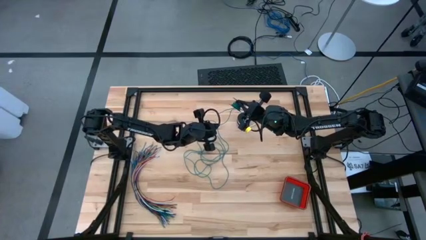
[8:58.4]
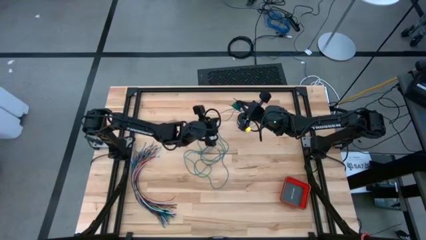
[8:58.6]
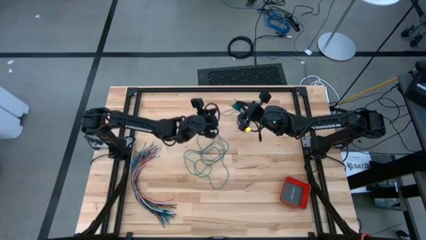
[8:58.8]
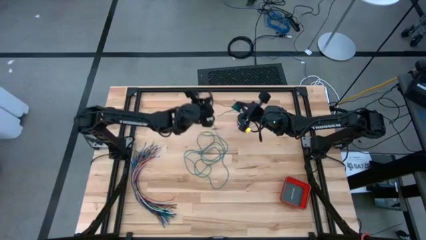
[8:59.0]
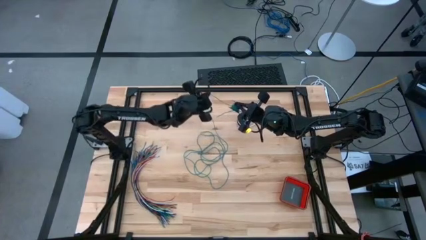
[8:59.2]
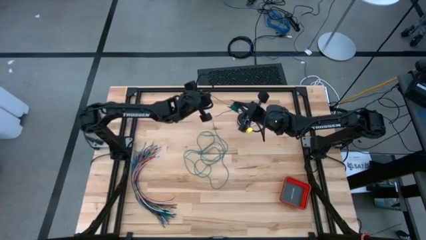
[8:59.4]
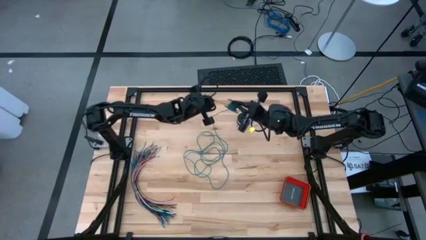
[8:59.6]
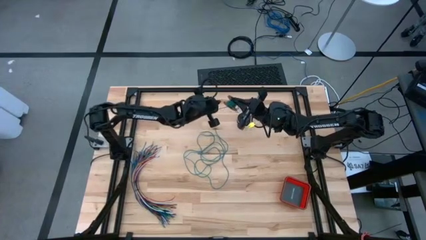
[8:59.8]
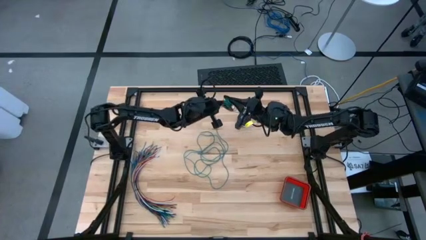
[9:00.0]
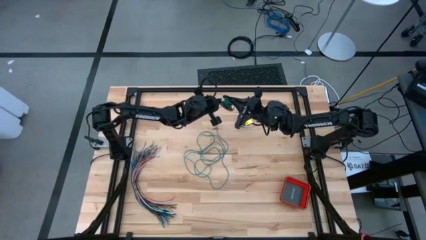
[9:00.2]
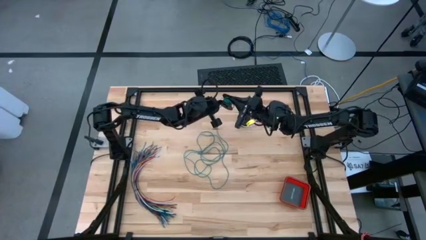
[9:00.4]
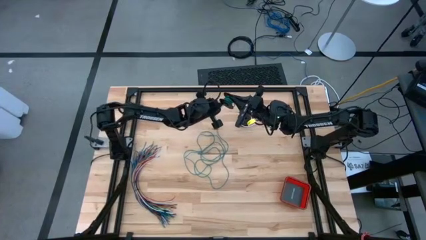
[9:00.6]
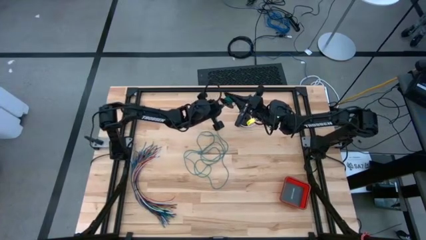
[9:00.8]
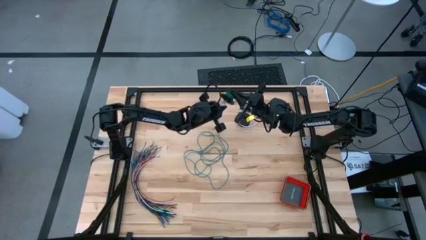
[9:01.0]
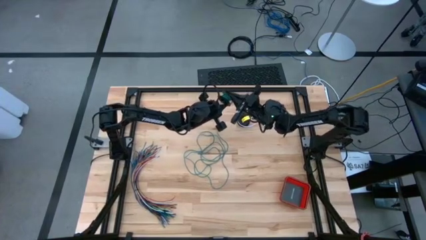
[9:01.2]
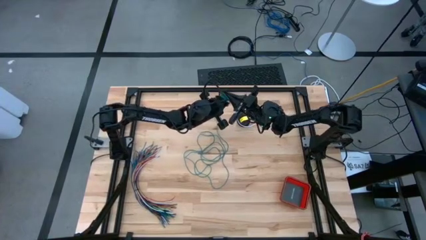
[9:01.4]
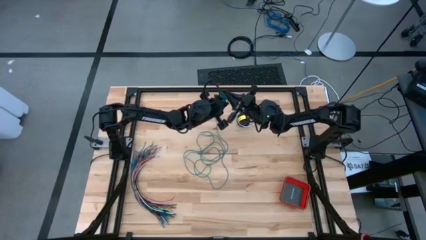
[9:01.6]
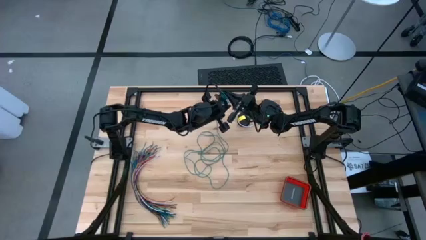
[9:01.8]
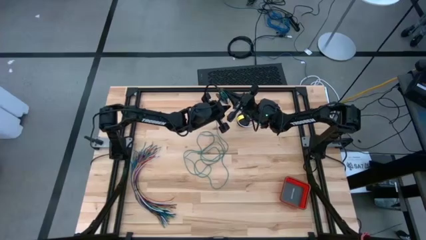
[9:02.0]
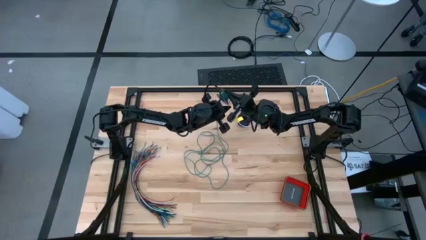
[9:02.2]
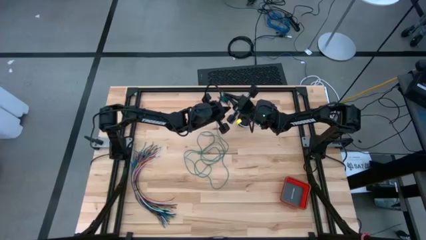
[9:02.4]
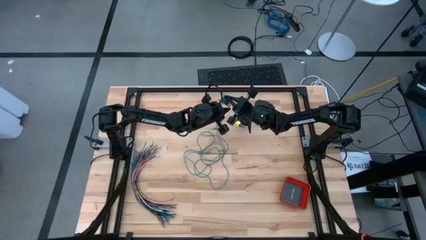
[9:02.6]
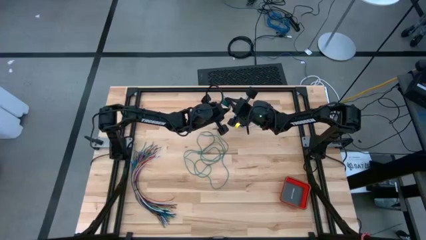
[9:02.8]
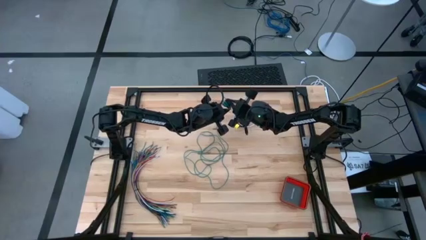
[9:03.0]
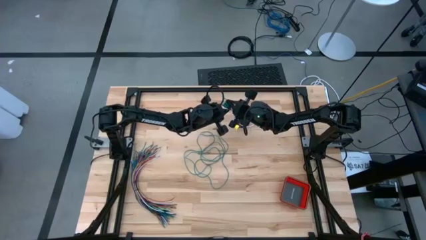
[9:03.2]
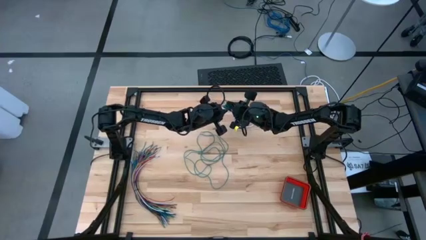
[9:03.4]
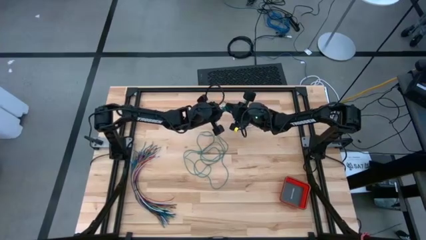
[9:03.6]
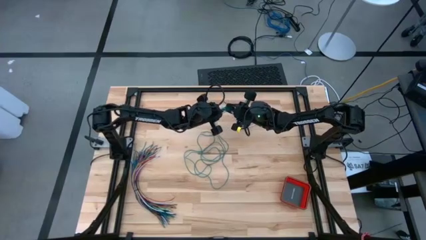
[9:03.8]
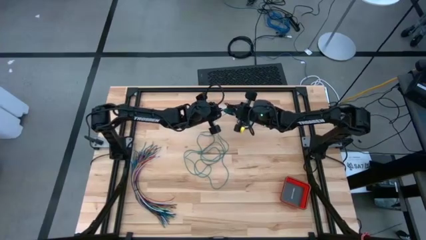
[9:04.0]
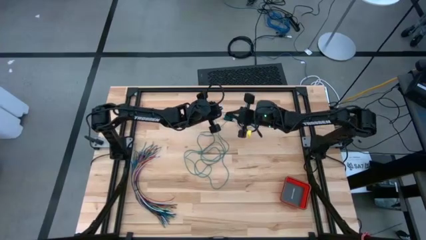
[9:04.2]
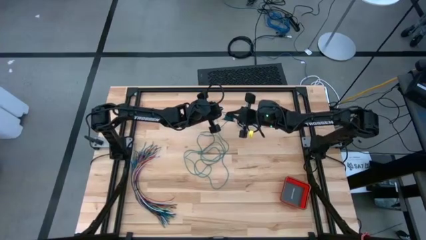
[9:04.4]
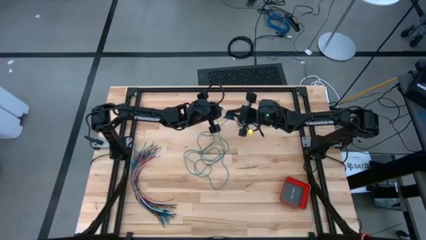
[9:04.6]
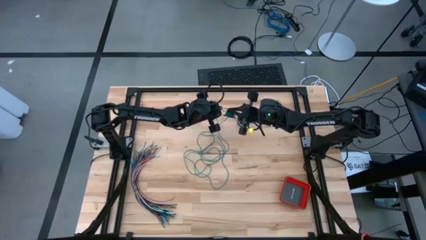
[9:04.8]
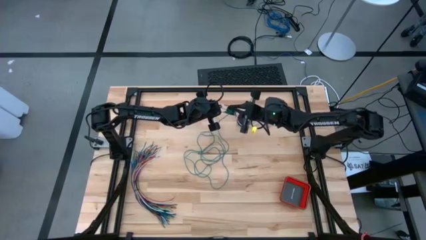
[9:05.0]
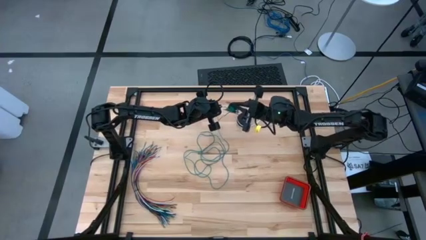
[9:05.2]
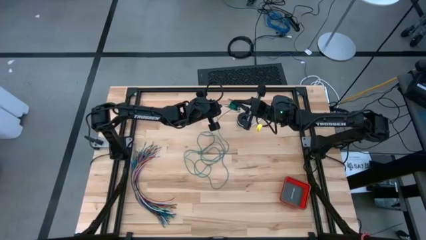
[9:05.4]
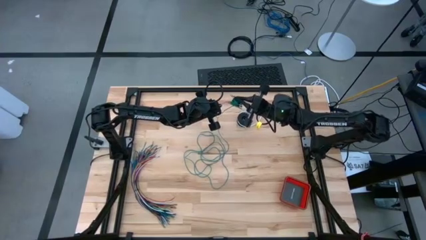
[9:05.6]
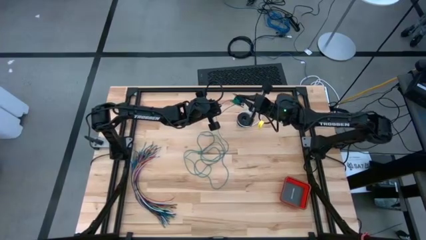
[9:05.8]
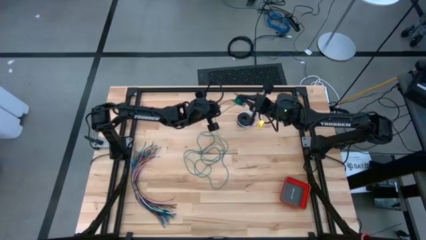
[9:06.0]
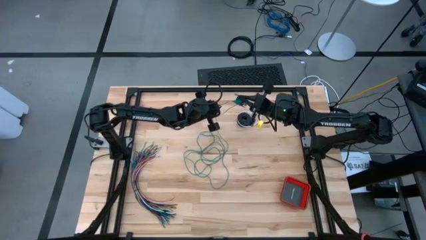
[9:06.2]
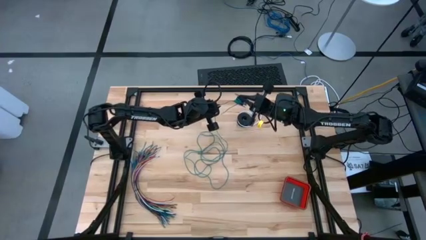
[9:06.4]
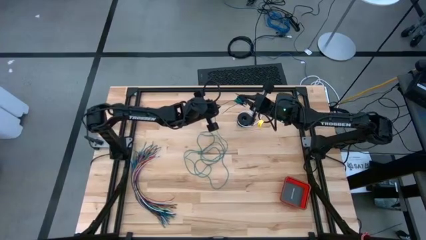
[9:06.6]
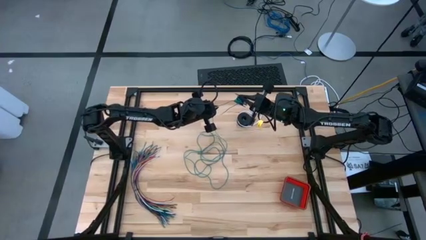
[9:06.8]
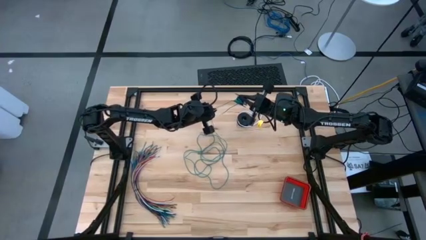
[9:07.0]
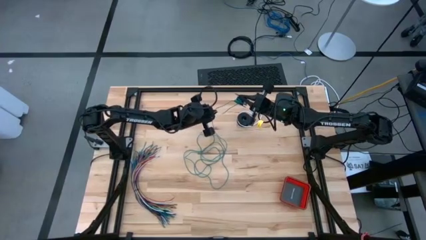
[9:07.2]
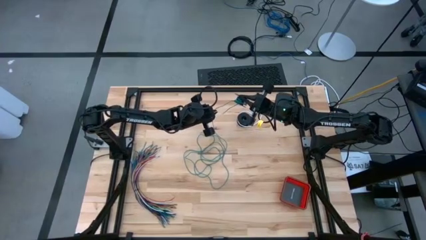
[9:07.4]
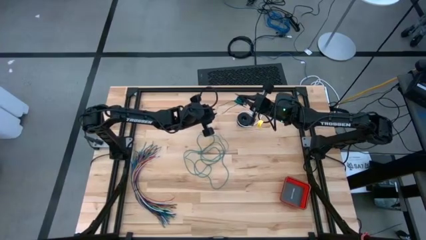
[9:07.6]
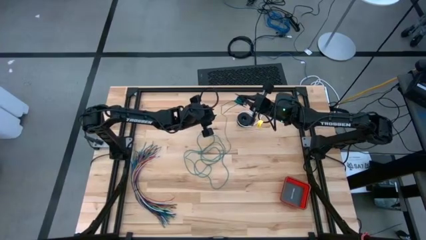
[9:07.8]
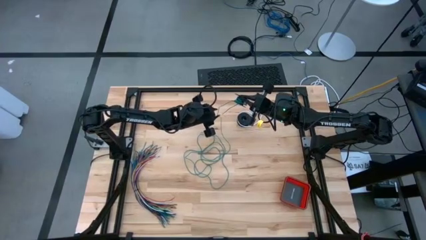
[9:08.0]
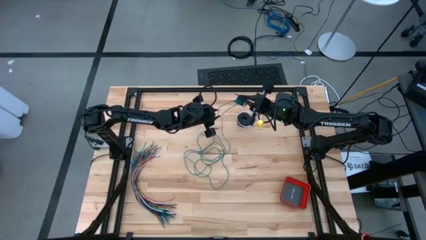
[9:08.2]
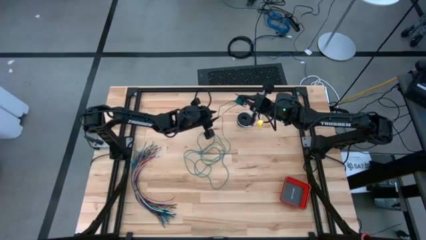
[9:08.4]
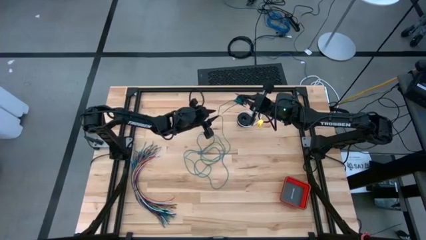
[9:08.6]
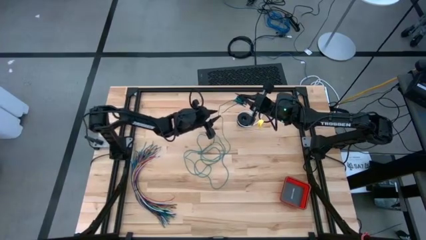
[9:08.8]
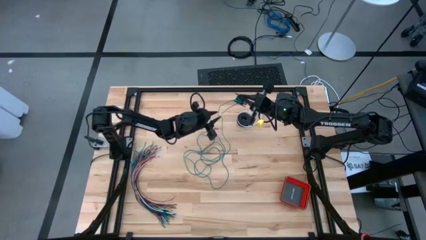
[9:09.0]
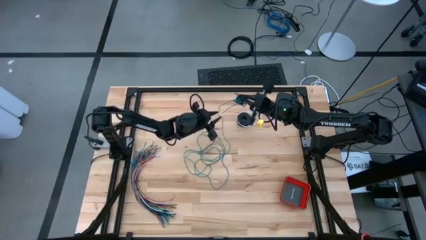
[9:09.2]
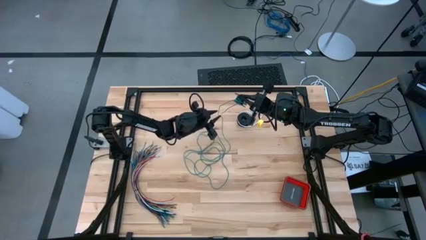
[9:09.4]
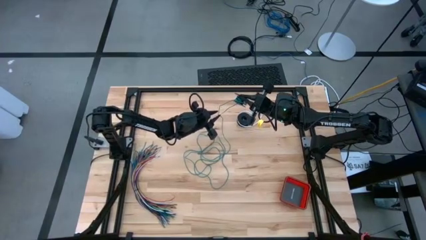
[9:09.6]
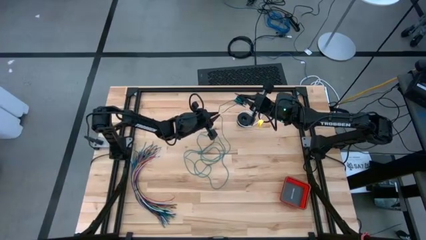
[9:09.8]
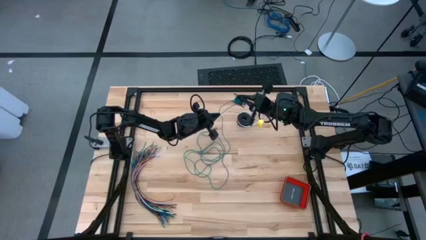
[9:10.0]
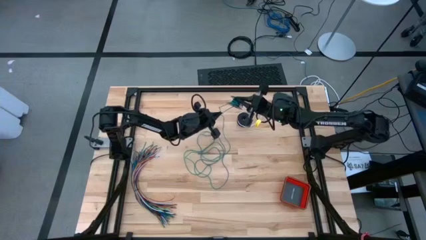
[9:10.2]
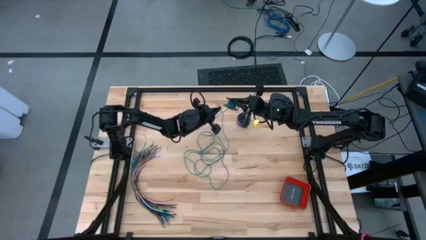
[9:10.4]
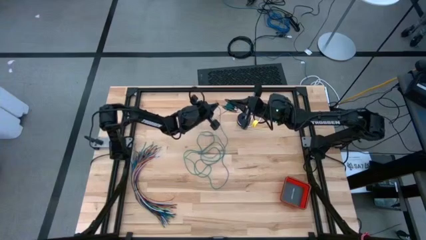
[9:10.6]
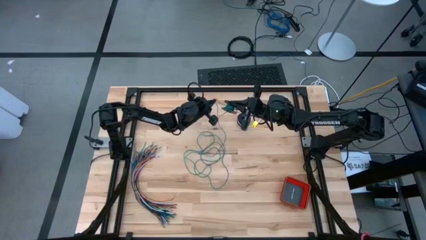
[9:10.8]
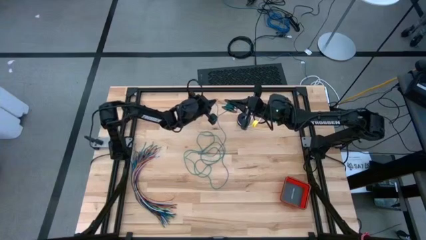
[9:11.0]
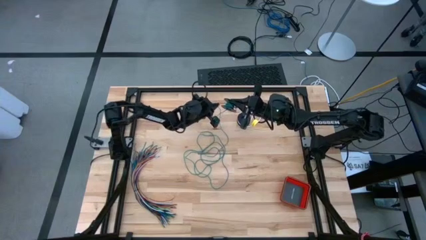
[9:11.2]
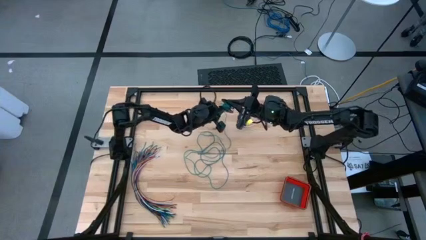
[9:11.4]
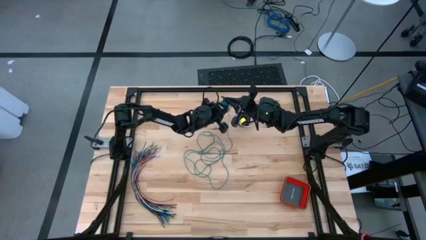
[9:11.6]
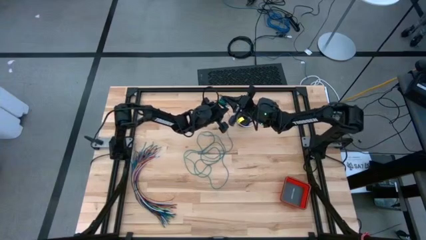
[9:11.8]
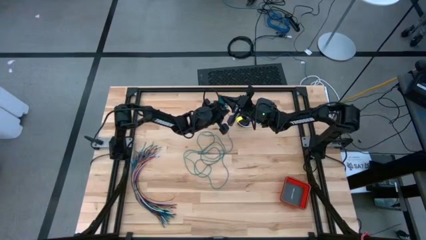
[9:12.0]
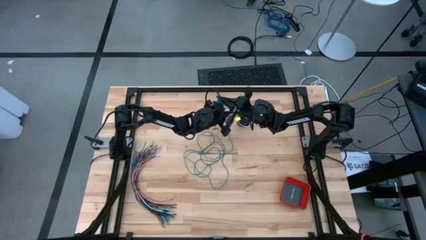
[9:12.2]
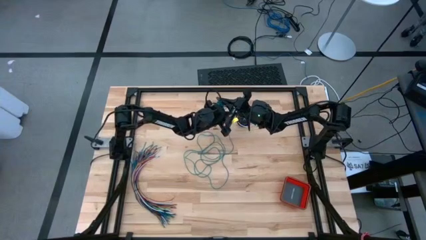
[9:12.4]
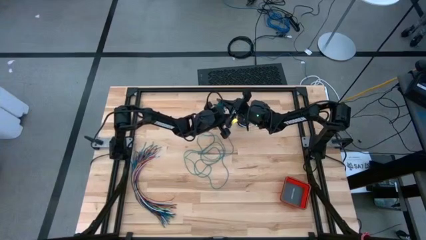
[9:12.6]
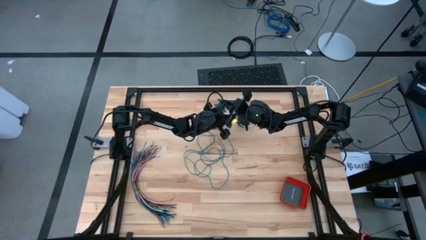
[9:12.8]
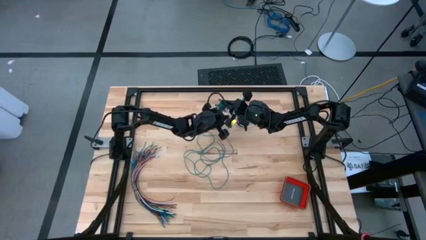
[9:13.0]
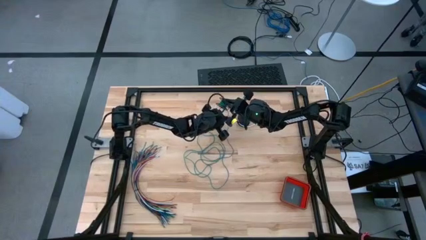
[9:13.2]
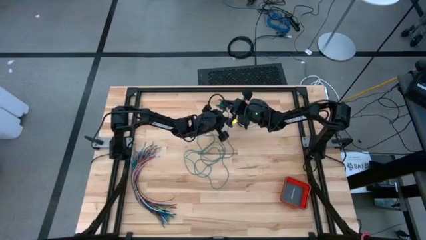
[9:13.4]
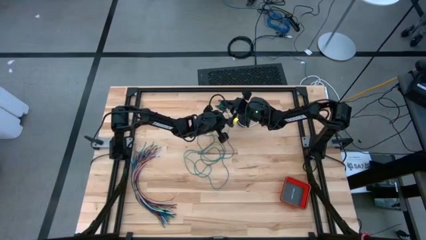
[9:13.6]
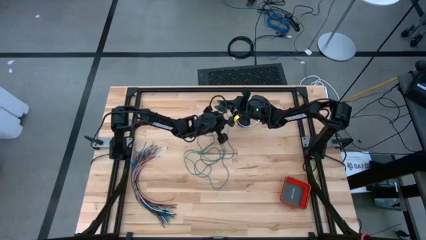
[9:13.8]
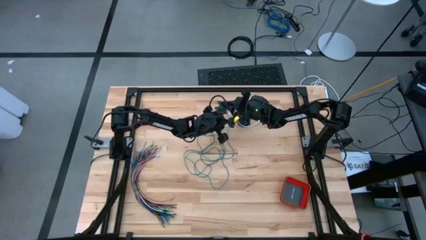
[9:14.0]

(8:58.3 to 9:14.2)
Task: Coil cords
Coil the green wire onto the spool
